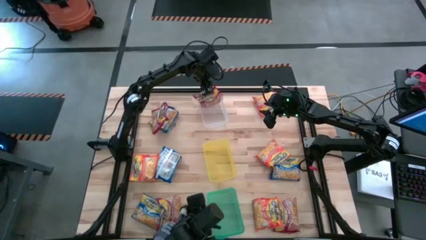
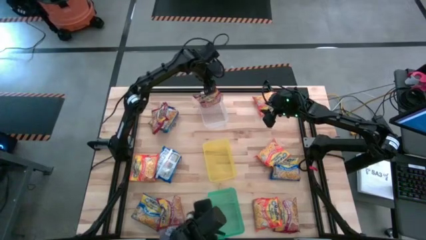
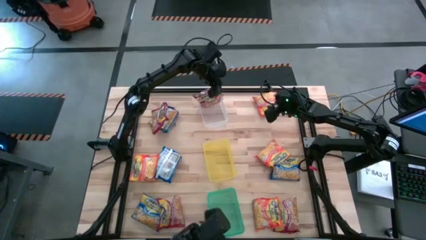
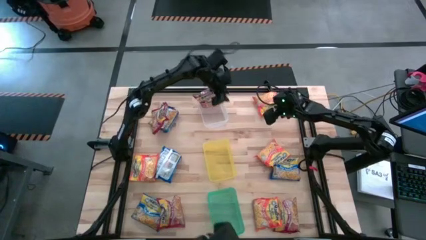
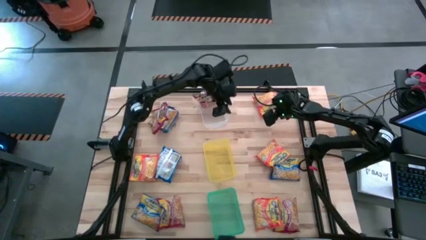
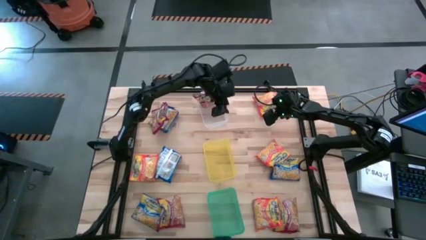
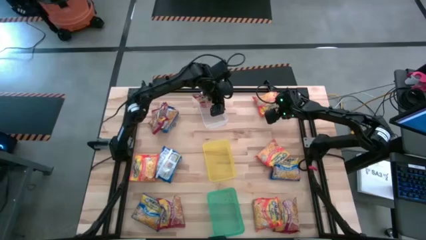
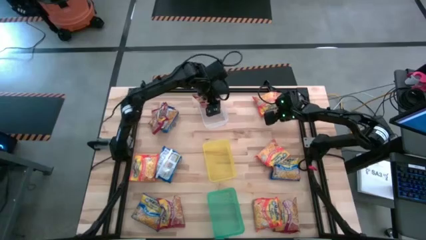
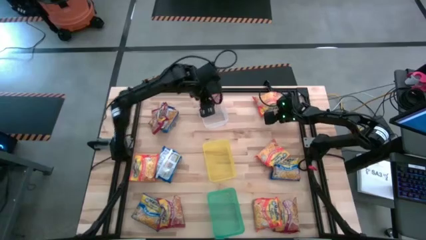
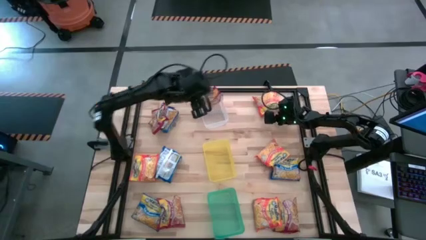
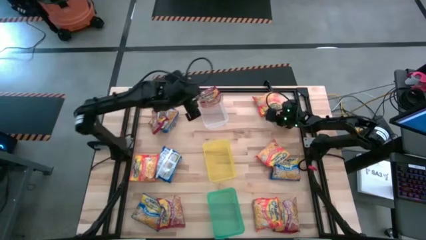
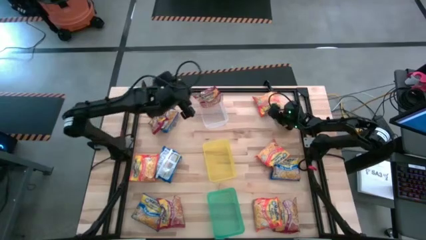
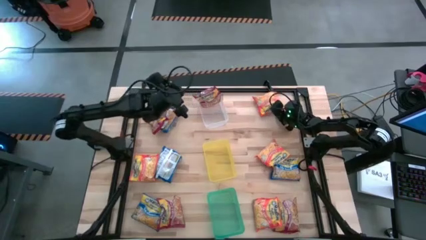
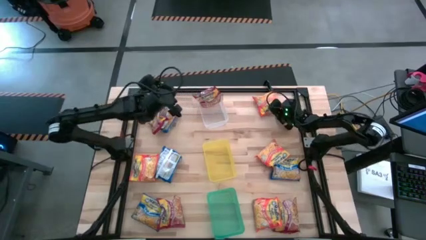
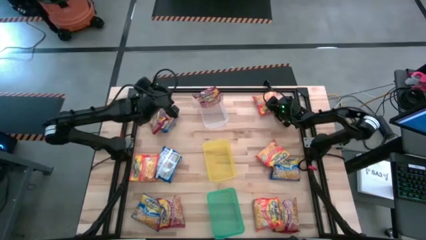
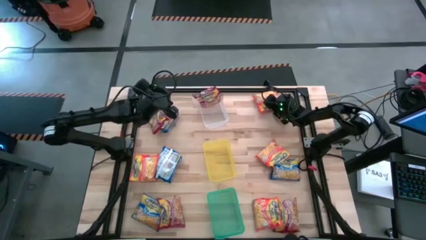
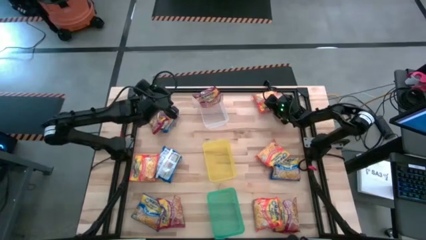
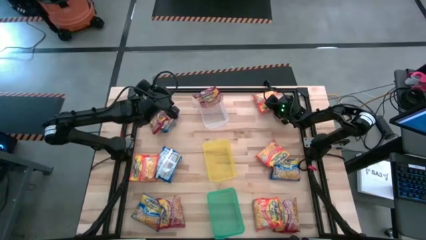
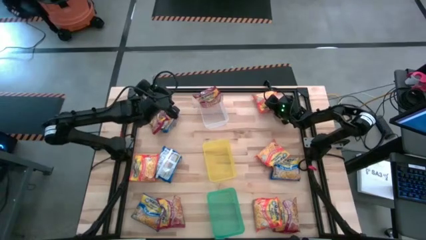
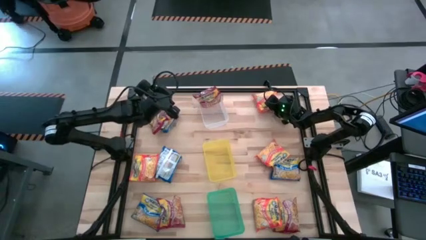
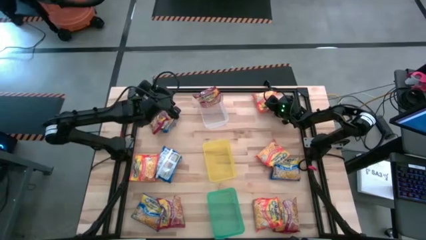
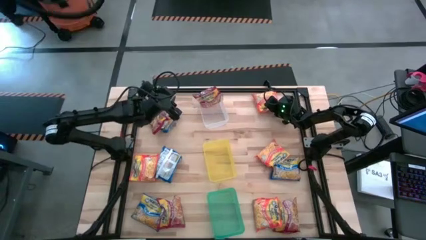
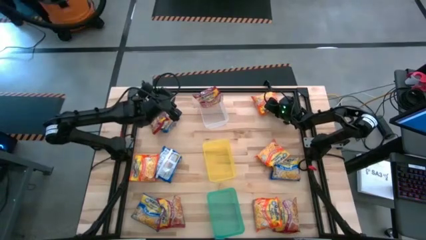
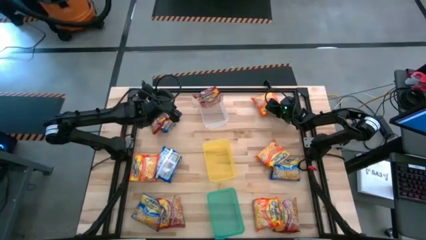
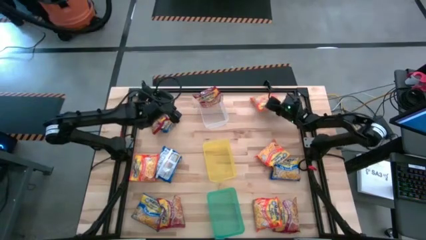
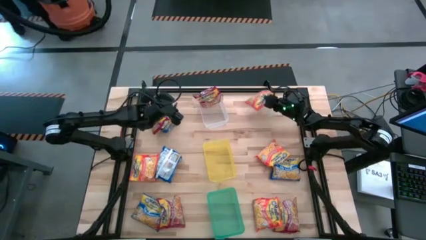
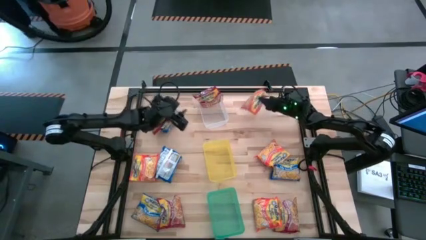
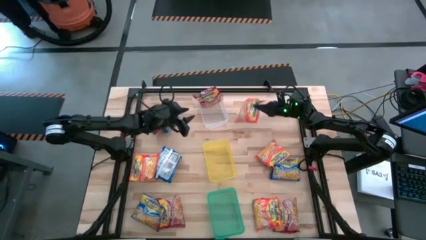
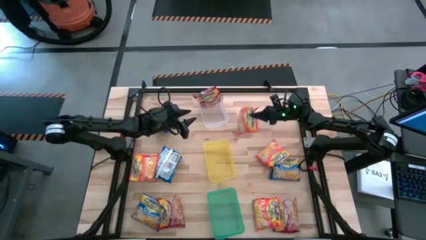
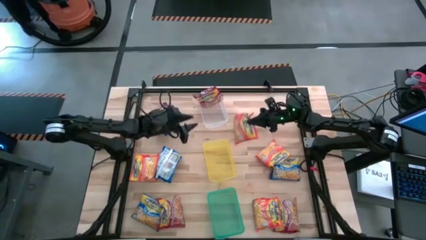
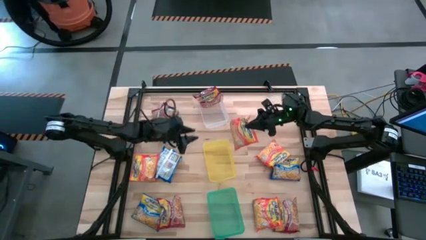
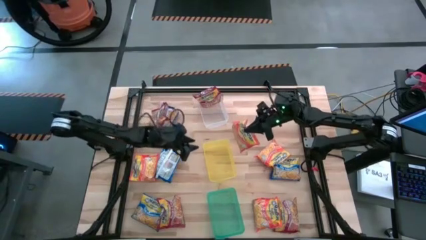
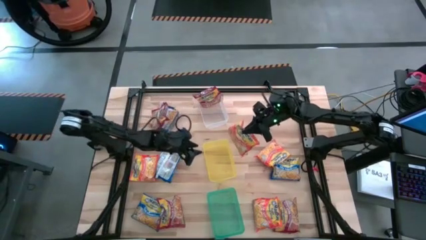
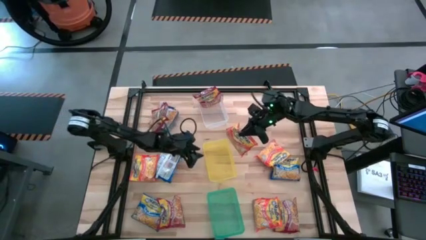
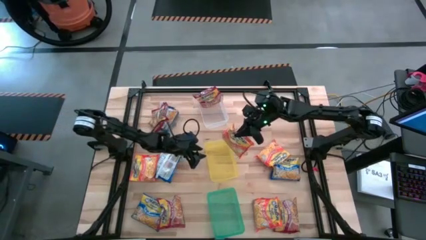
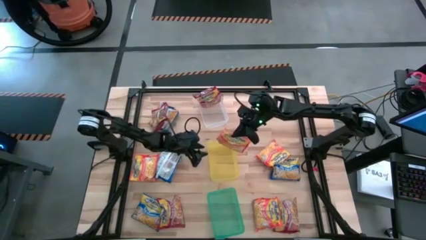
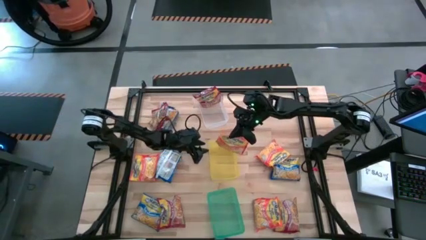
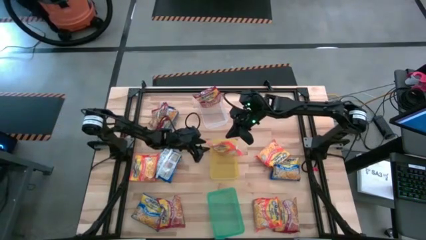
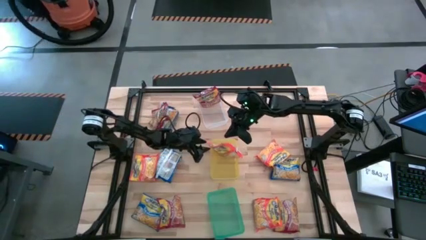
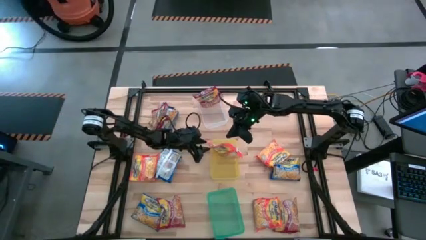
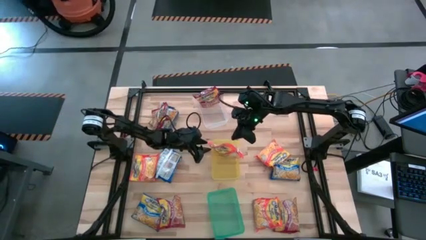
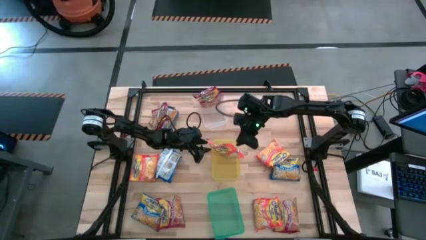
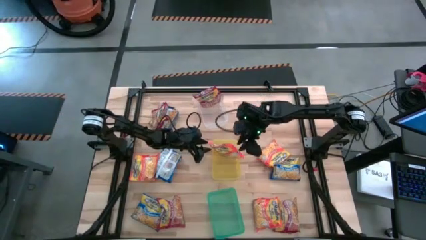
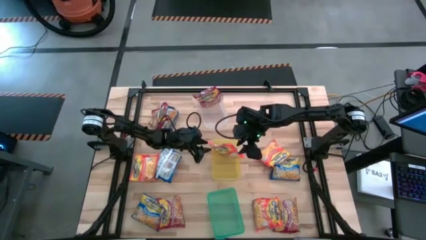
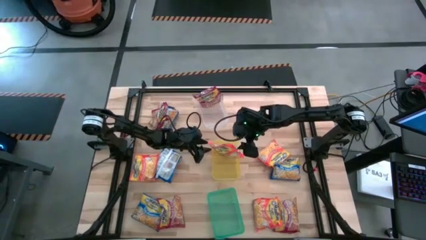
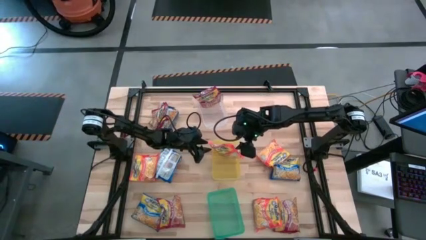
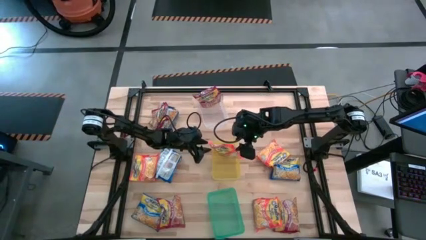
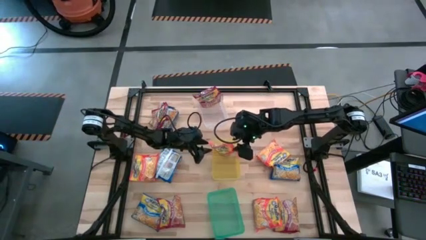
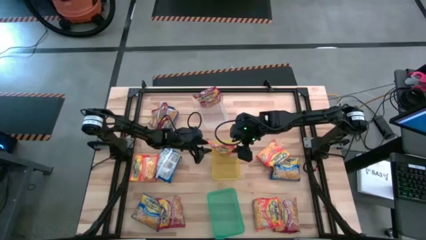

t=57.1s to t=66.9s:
Task: Sort Maruchan noodles
Put the orange noodle pack into the yellow bin

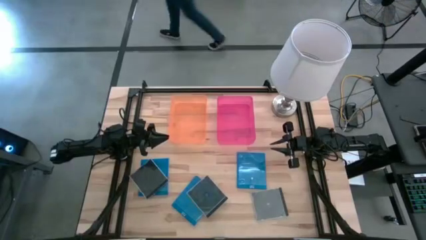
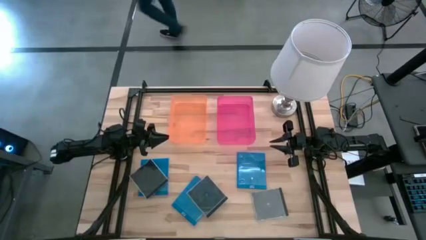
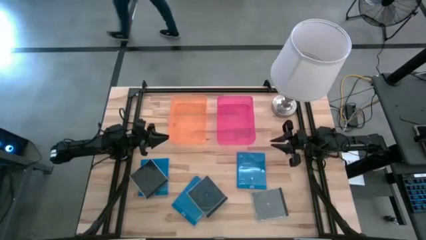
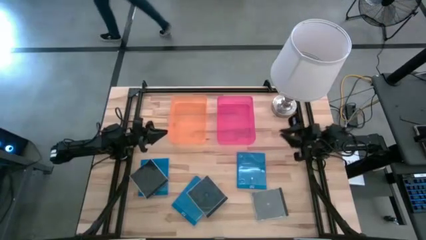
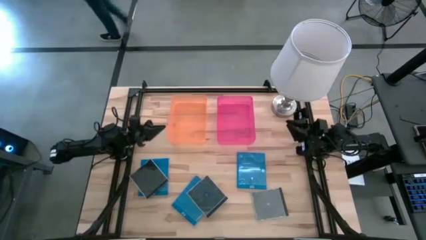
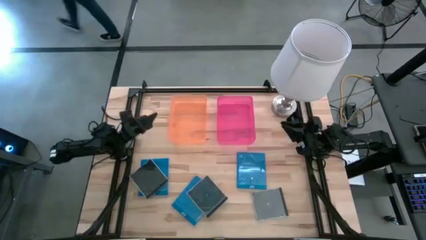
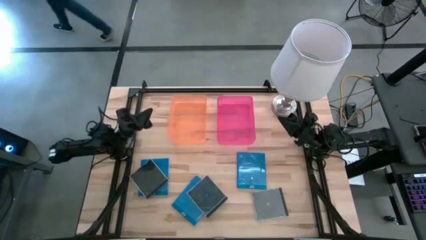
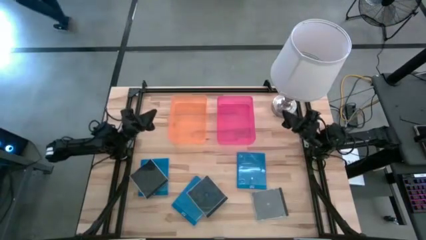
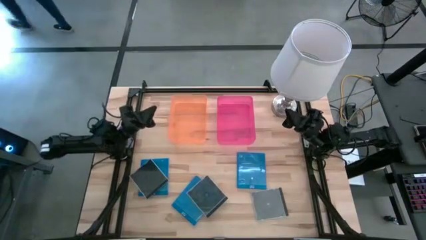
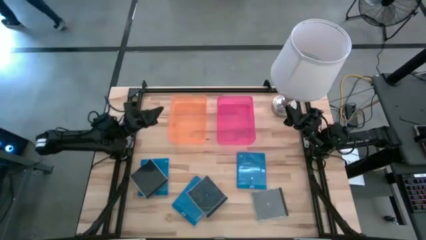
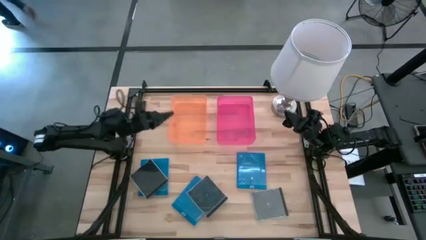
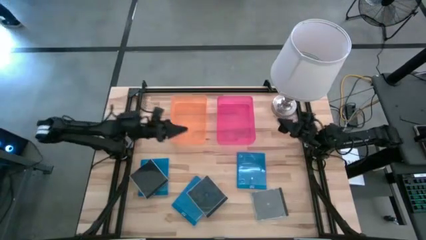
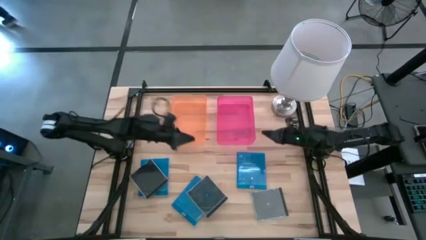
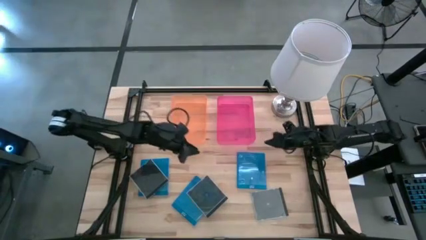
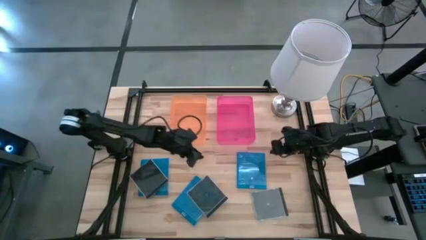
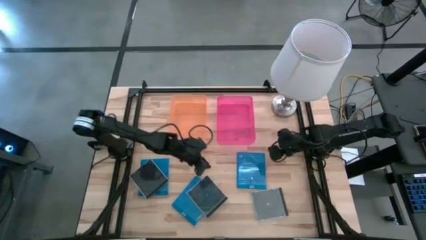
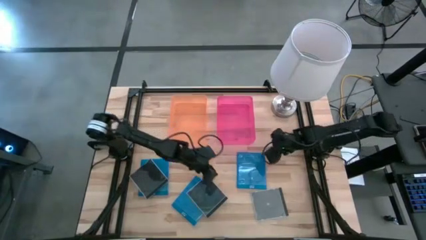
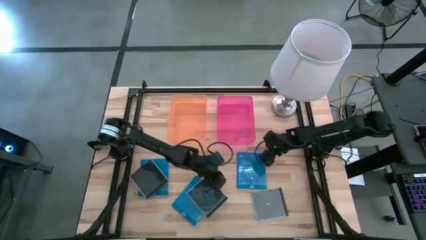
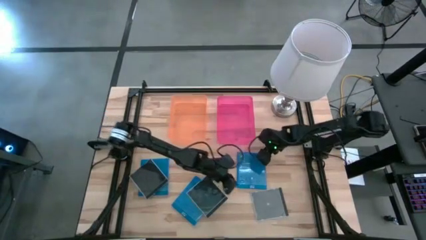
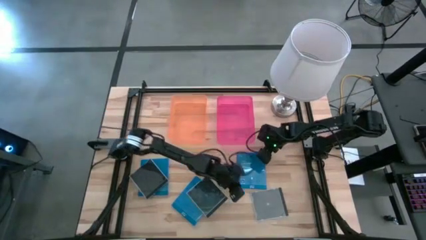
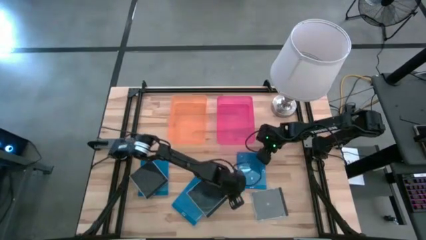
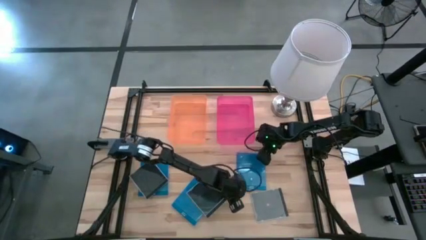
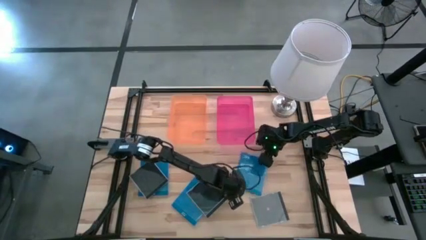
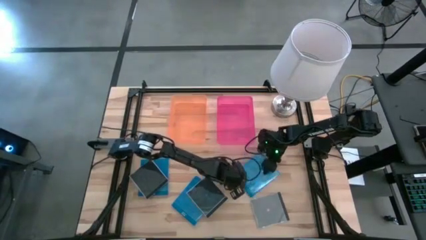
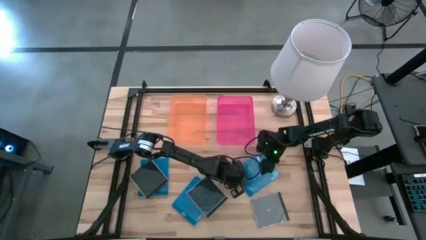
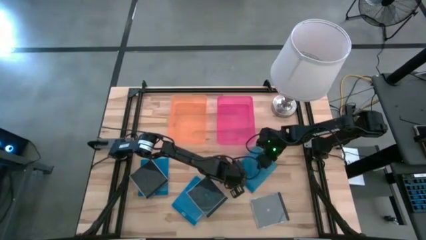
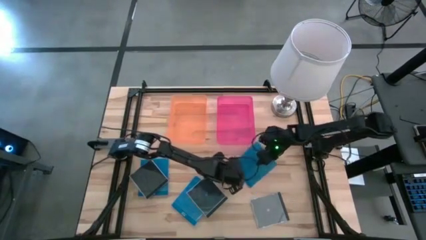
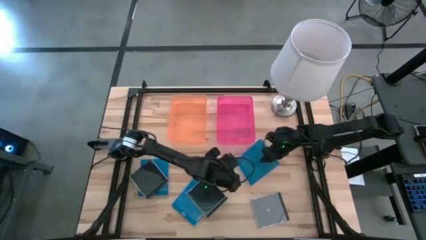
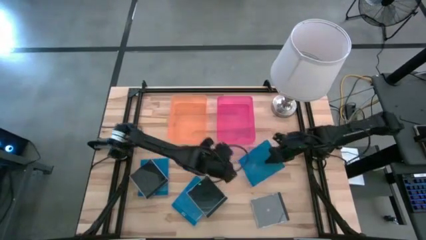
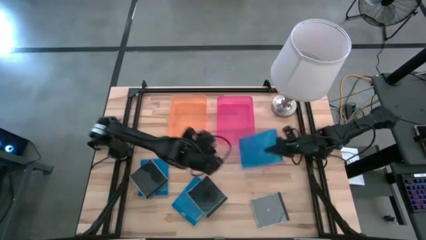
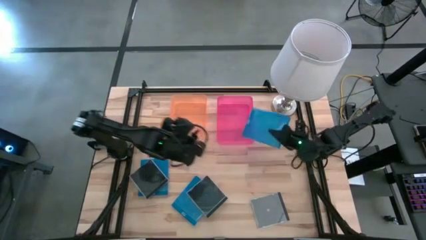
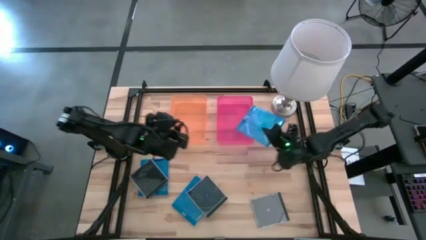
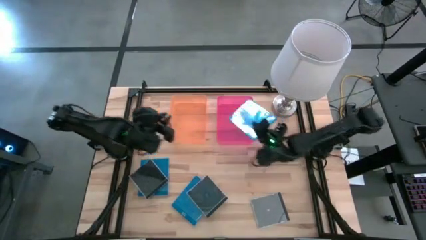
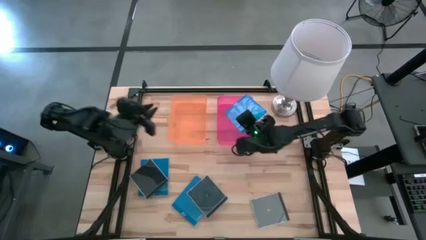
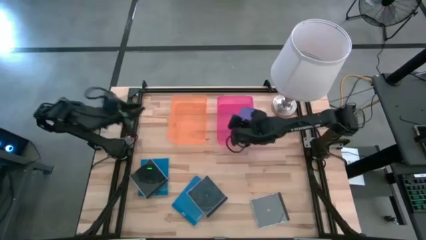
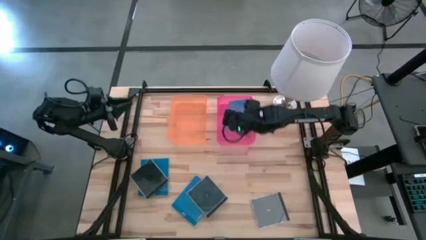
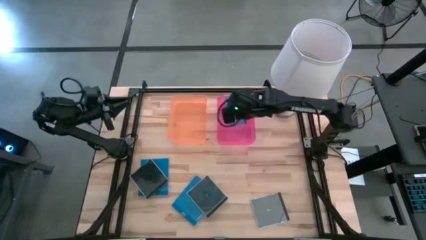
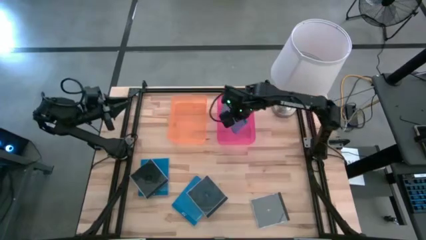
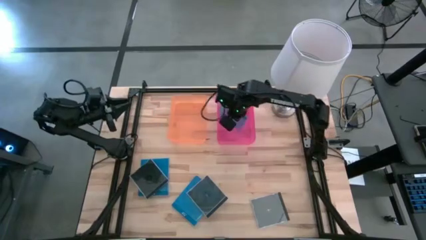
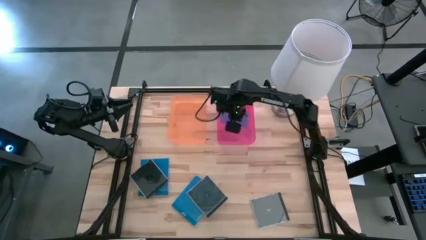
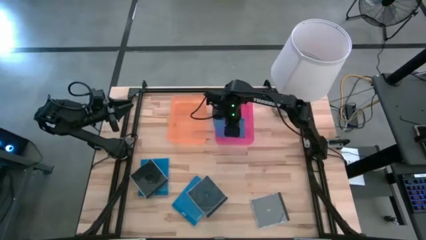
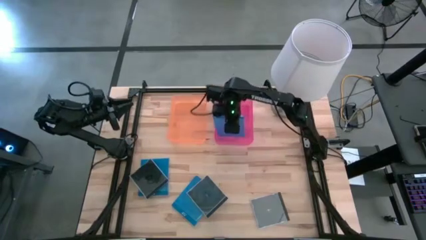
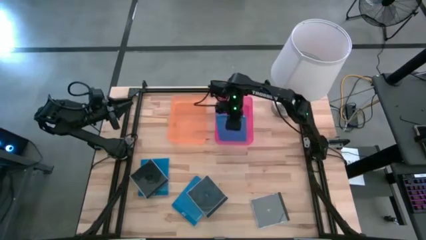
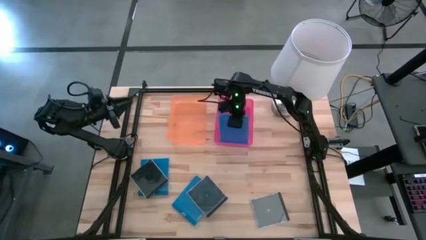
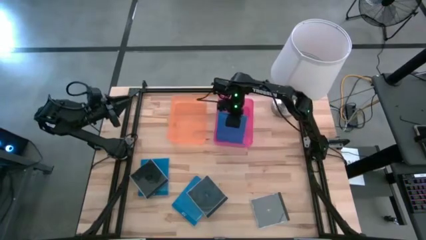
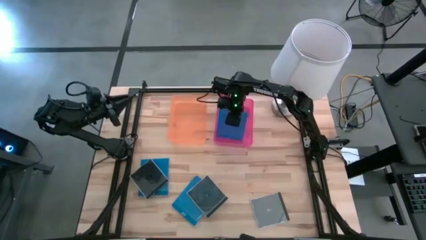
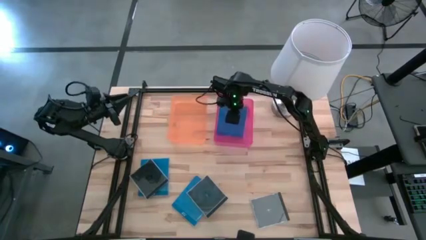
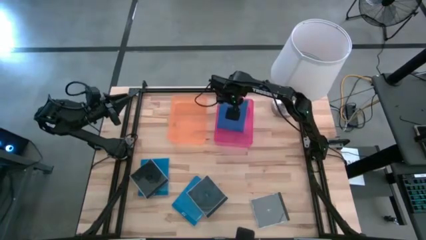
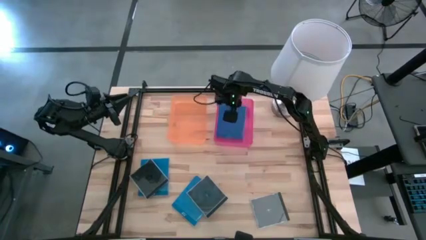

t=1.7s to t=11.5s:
Task: Pick & place jewel cases by type
Put the top right blue CD case into the pink bin
